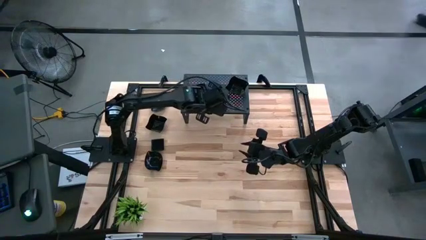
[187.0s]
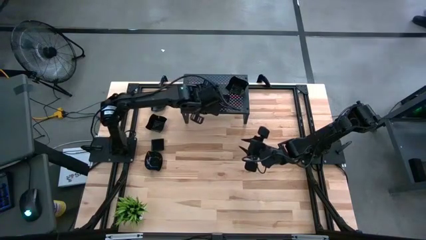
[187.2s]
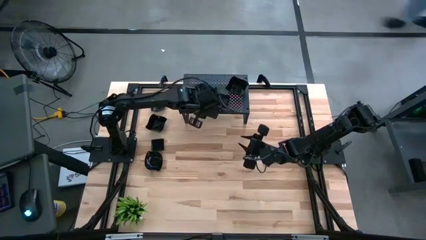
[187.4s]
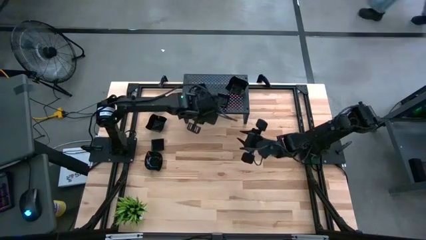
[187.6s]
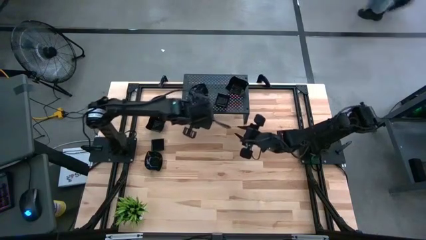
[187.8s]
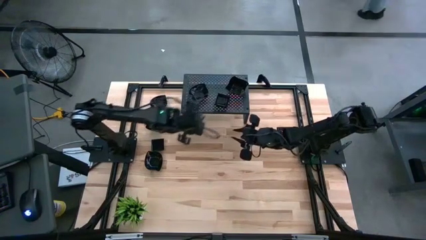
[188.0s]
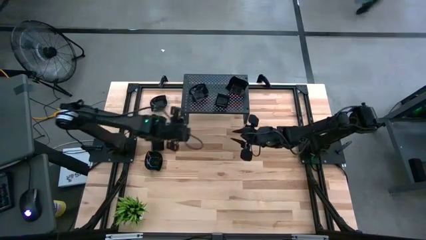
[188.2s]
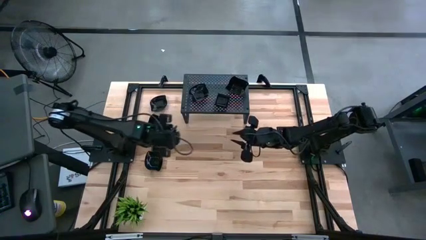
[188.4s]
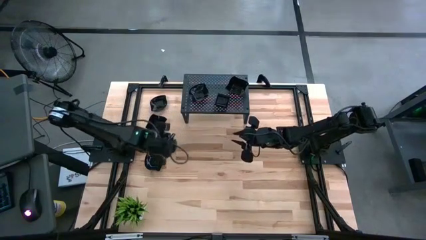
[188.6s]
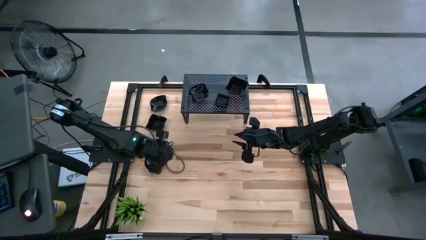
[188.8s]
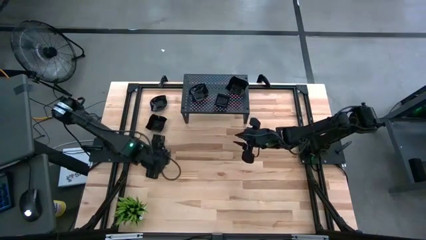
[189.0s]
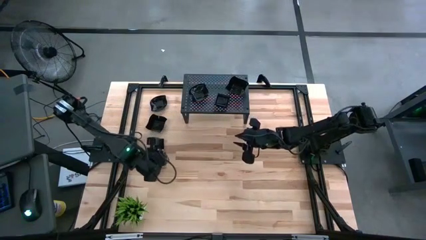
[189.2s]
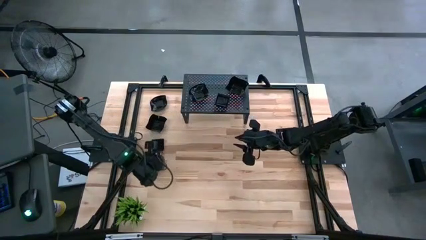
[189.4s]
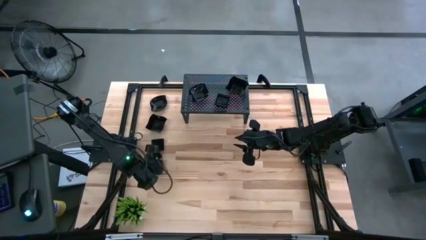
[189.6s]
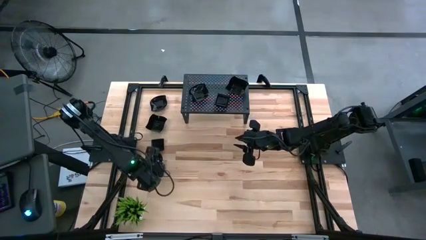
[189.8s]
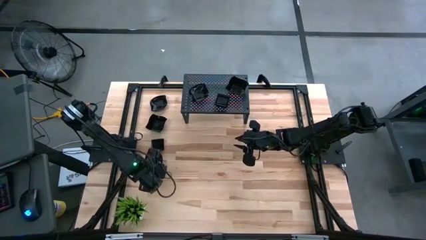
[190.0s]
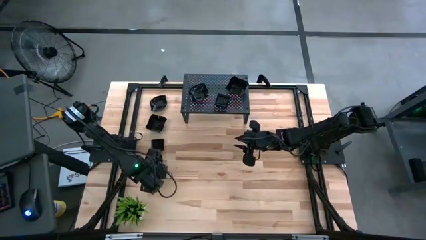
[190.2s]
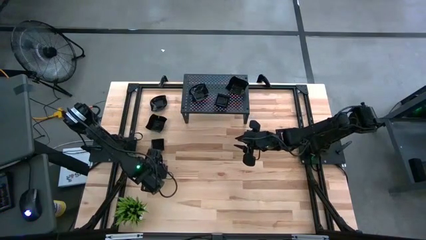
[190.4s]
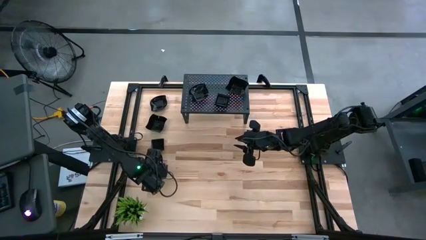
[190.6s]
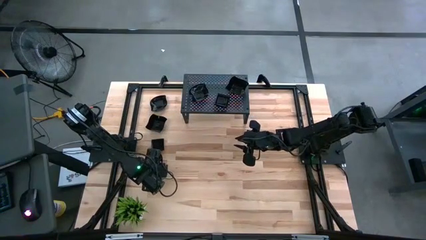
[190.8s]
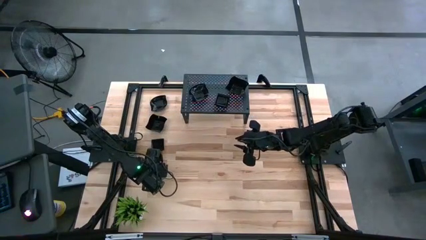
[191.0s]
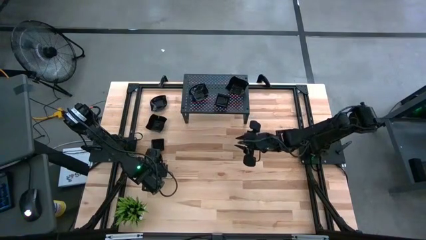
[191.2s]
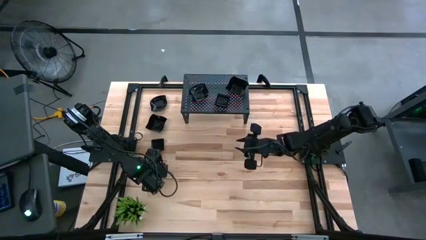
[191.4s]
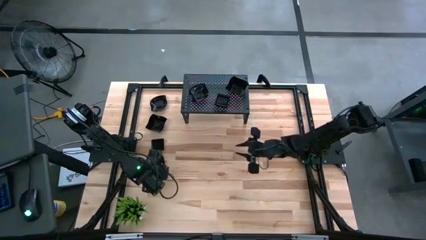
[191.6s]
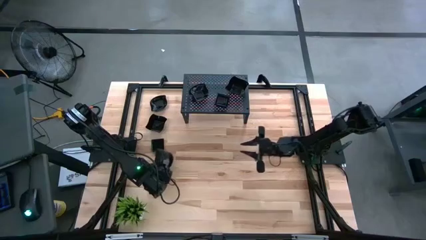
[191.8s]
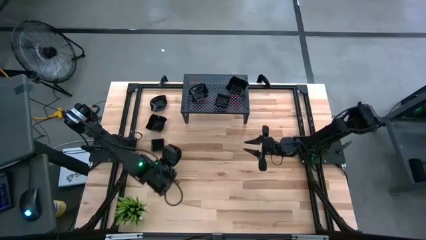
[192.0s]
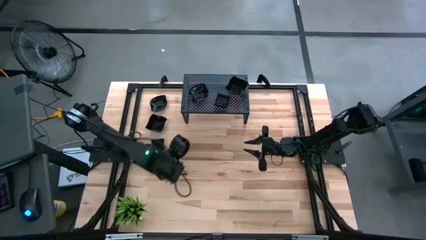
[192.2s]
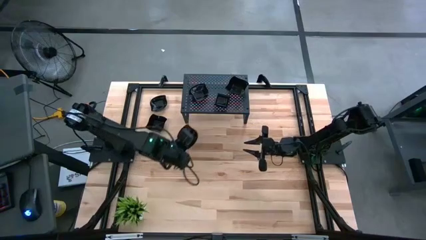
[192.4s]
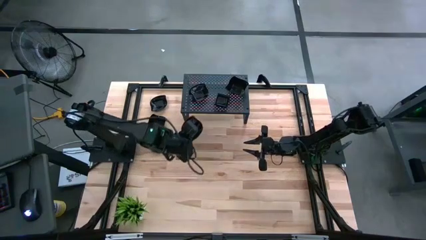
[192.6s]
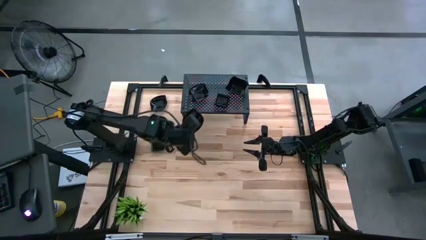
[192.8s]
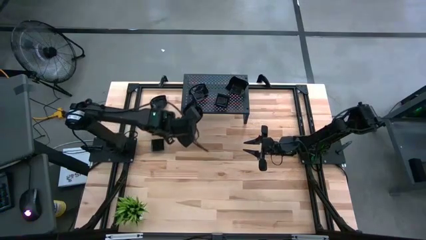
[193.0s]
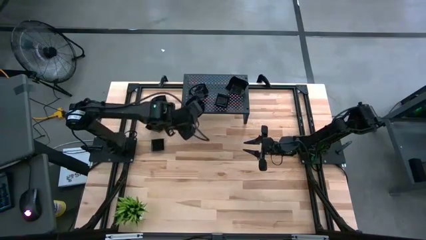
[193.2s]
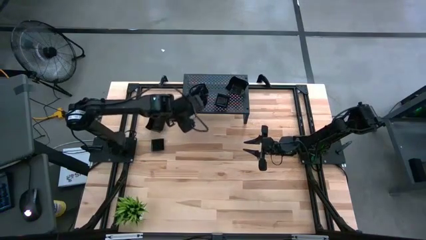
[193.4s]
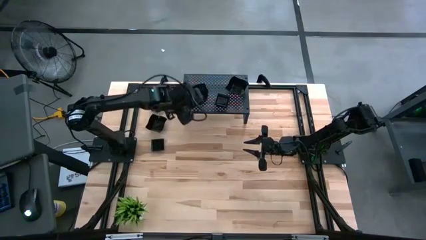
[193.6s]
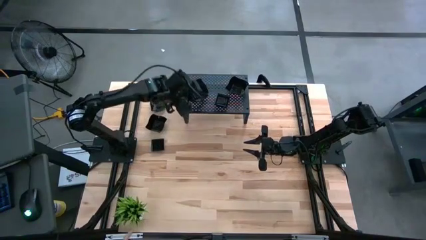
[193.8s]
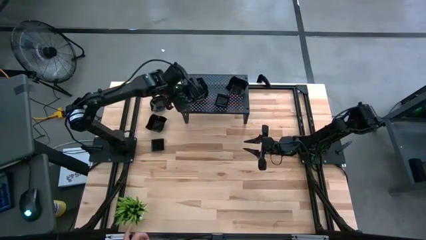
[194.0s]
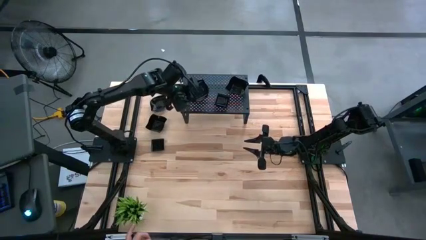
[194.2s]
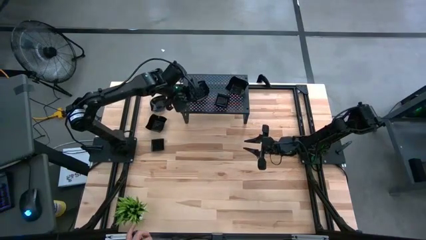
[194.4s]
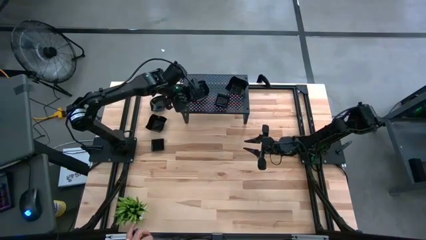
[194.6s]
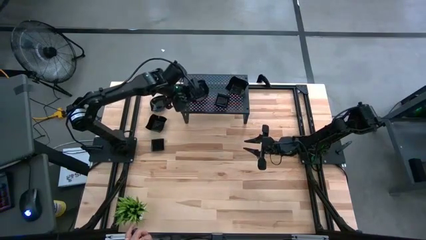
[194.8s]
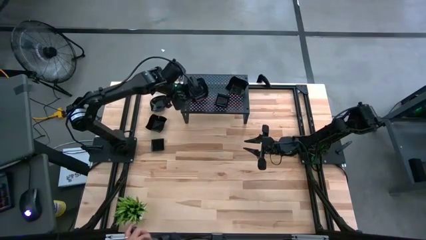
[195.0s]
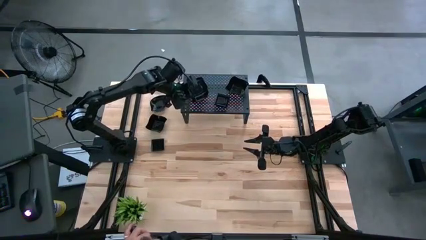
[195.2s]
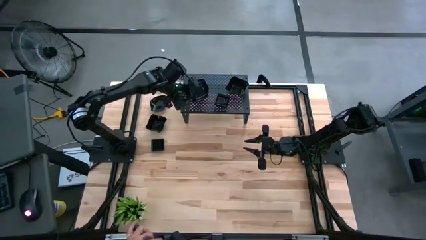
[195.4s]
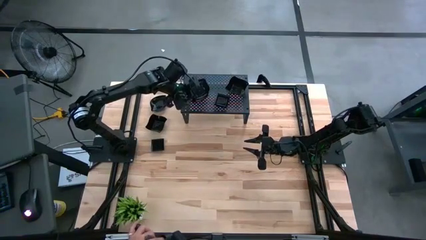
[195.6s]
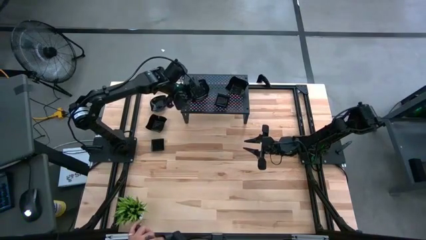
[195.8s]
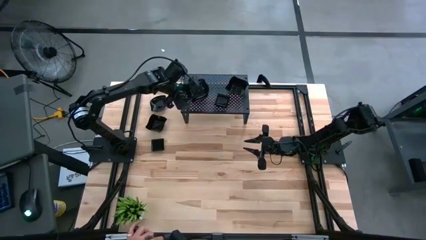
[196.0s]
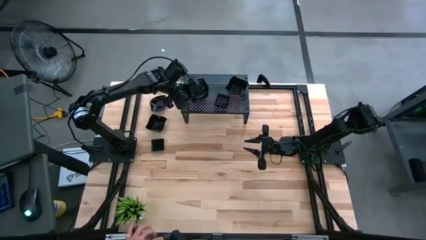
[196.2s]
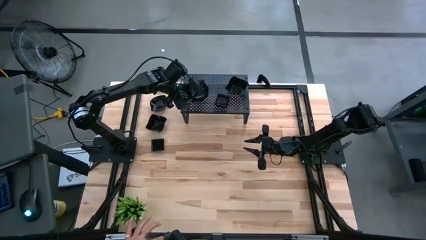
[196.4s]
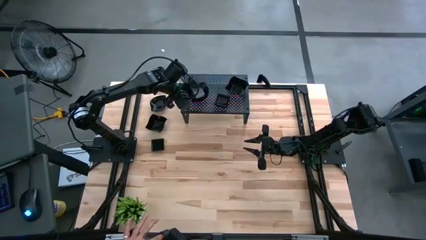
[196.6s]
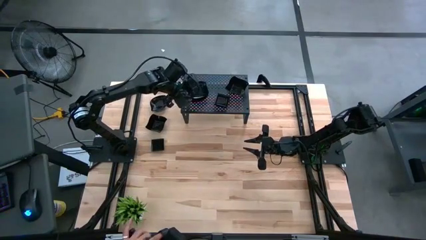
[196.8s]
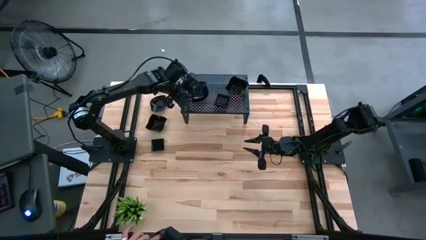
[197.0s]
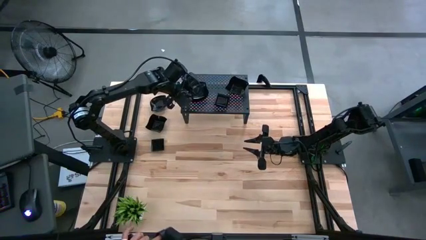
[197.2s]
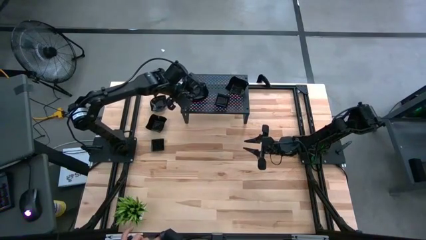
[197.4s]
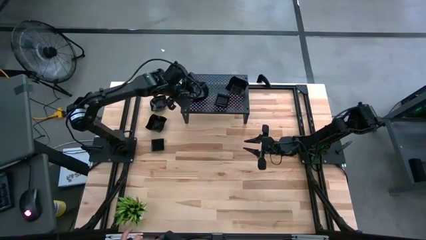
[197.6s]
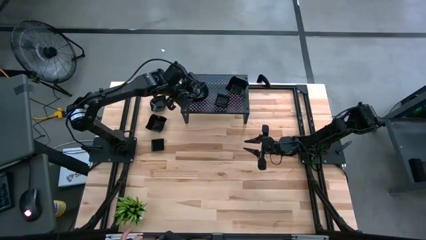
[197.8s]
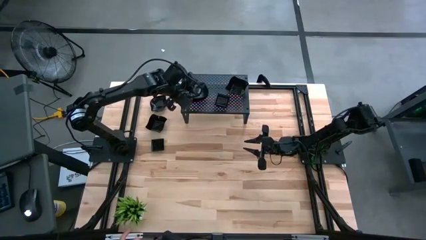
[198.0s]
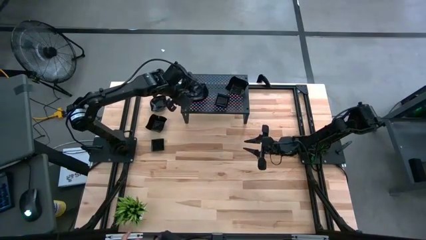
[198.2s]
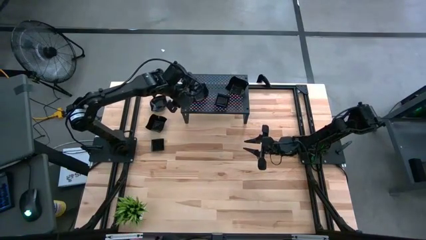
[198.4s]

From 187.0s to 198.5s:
Task: Pick & Place Mini shaped plates
Stack the black leaf-shaped plate on top of the black leaf-shaped plate on the shelf

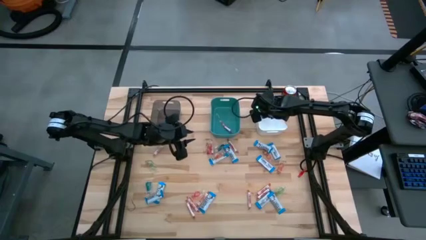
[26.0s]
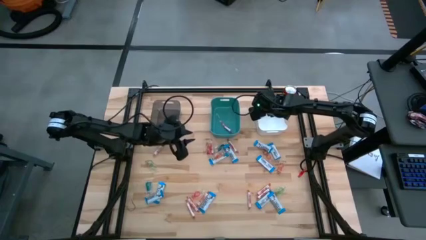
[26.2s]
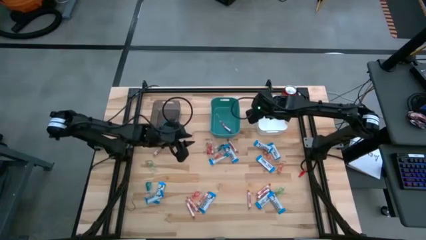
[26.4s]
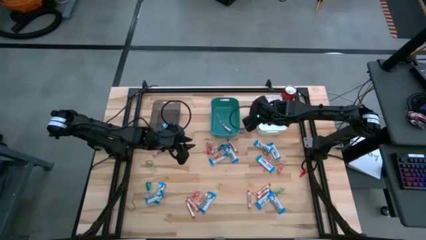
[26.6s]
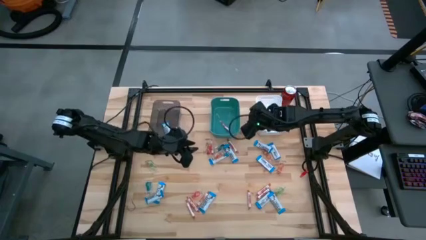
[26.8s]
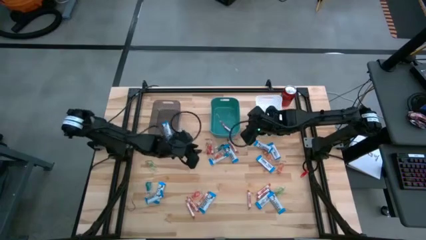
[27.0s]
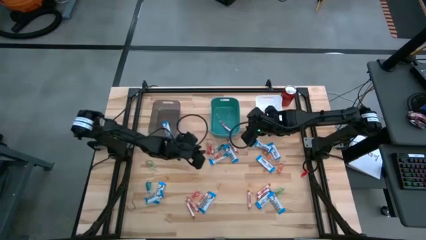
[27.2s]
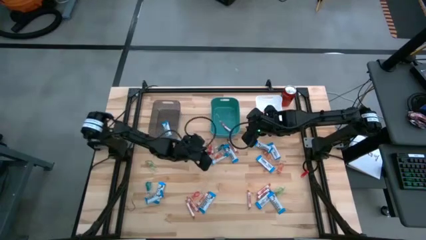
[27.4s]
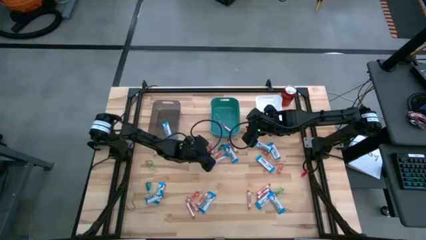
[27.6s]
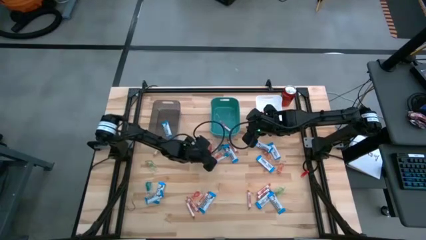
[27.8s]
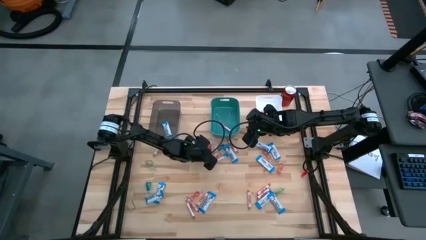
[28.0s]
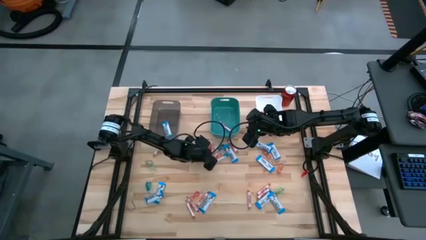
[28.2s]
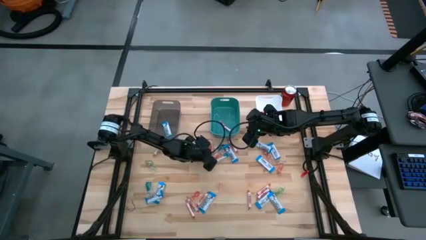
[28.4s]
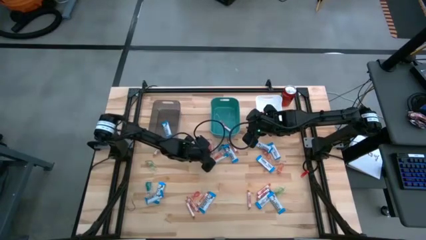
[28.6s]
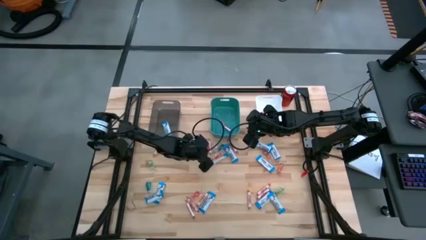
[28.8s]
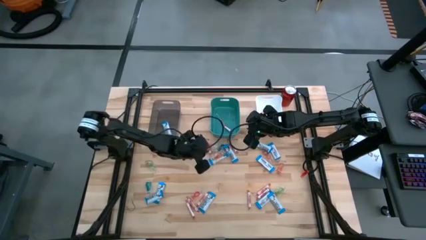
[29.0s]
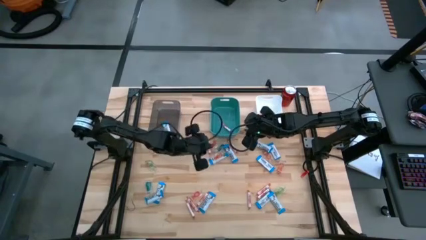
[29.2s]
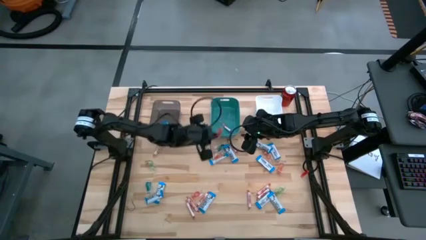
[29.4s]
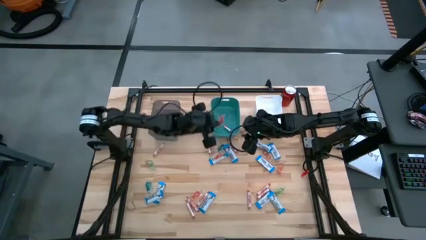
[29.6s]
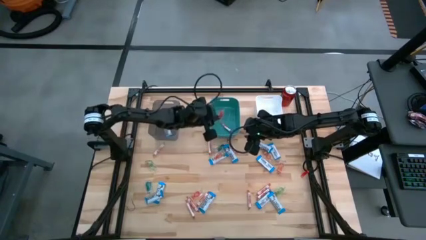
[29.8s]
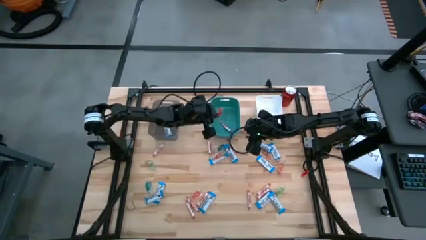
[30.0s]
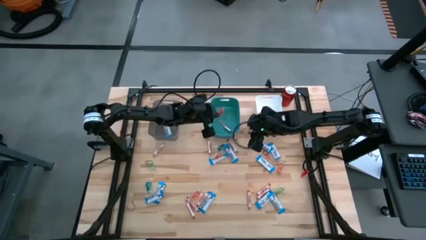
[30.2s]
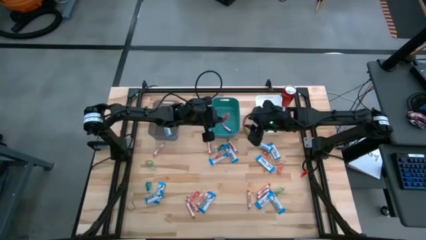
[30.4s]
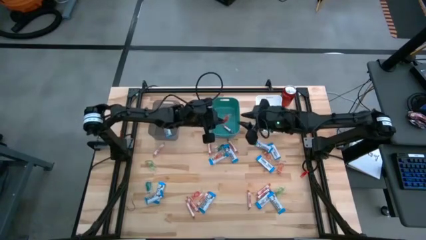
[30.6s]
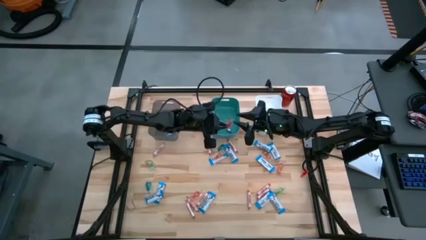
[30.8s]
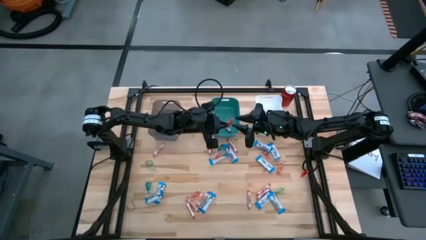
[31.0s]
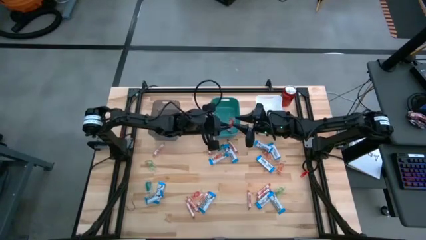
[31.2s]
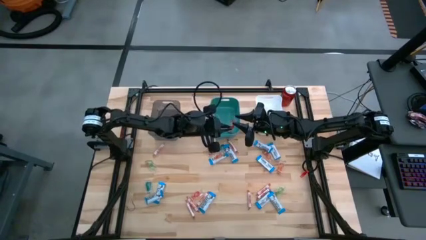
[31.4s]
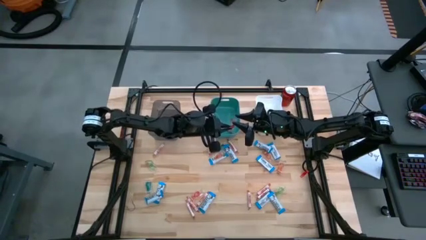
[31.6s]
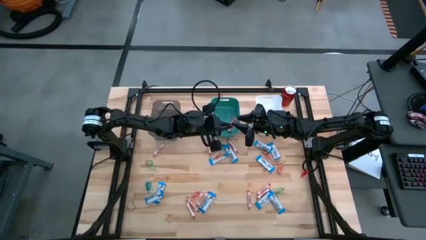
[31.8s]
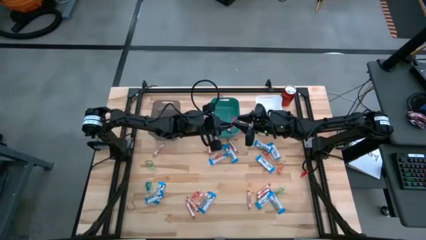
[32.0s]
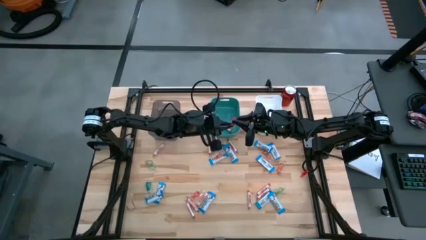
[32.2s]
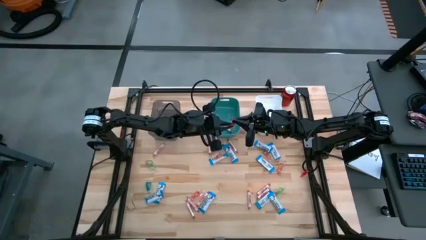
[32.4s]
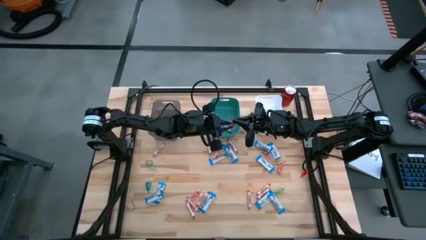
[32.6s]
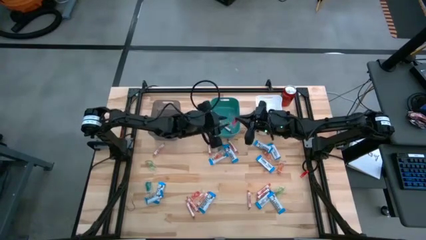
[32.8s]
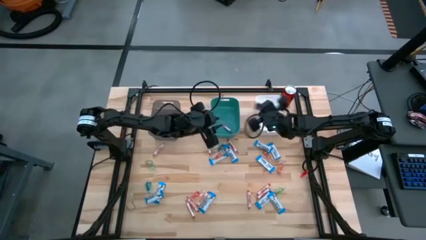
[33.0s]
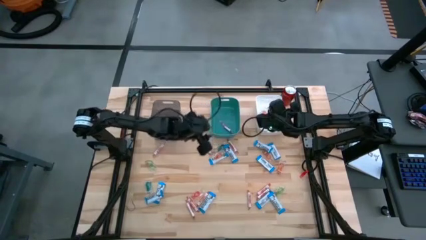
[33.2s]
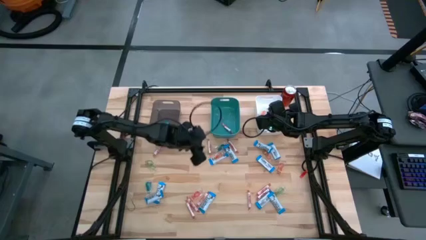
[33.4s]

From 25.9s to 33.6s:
Task: Sort candy
Put the red gummy into the white bin
